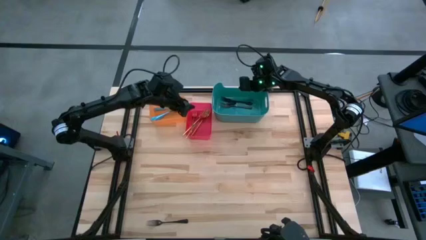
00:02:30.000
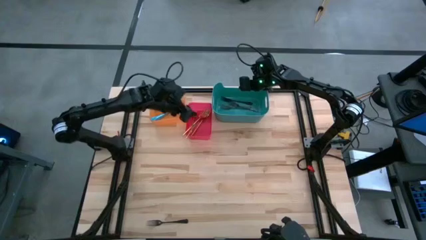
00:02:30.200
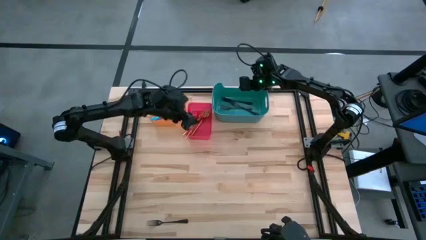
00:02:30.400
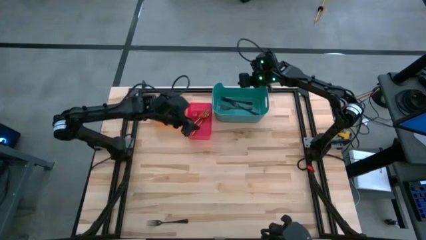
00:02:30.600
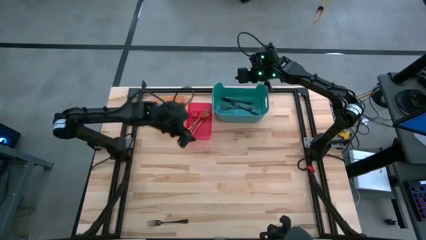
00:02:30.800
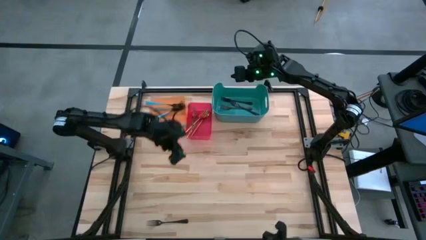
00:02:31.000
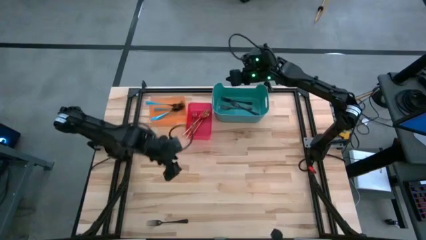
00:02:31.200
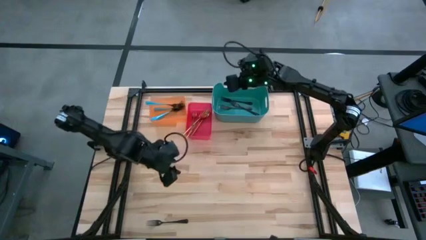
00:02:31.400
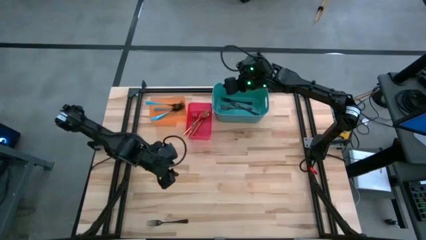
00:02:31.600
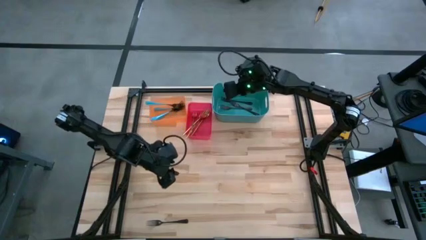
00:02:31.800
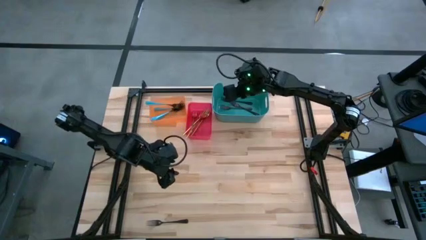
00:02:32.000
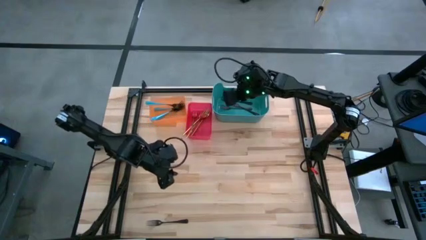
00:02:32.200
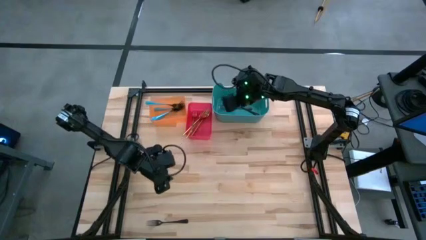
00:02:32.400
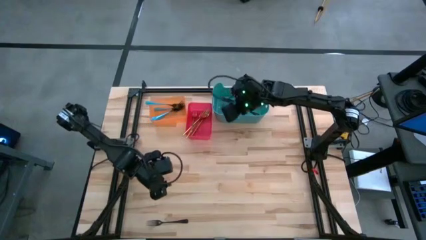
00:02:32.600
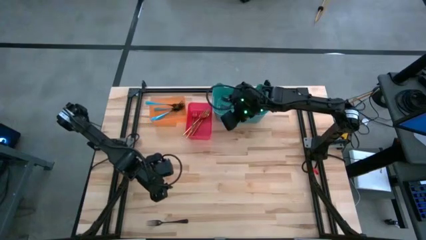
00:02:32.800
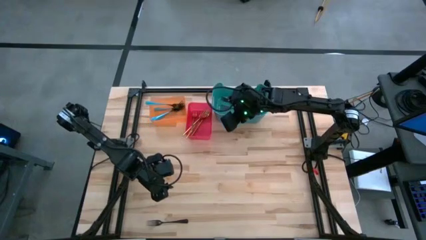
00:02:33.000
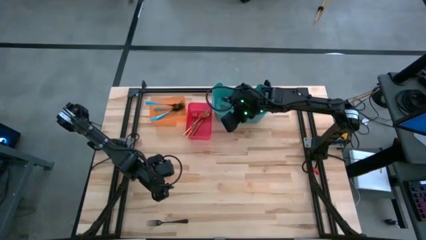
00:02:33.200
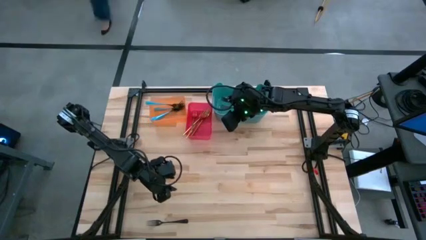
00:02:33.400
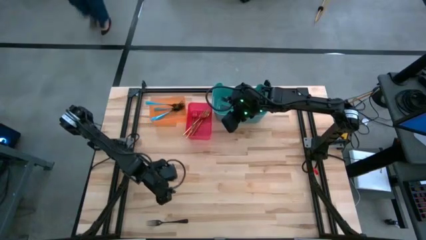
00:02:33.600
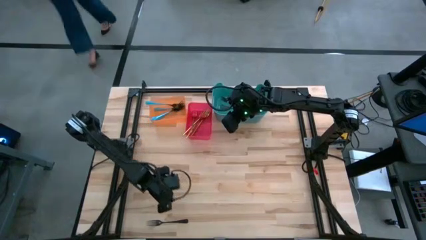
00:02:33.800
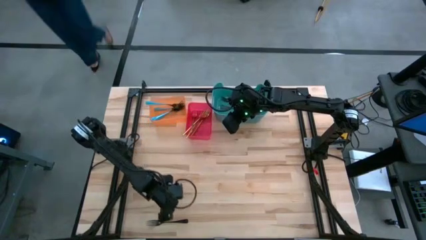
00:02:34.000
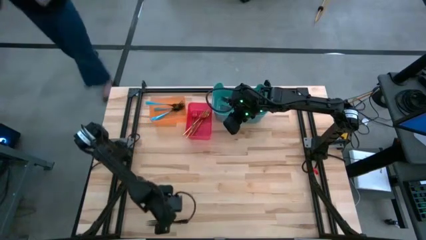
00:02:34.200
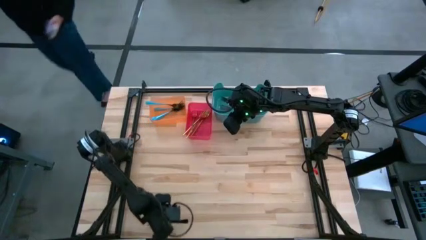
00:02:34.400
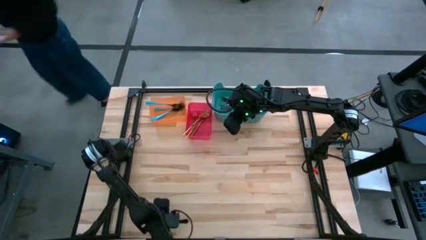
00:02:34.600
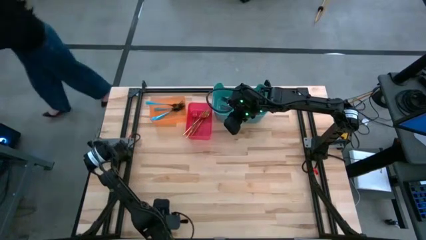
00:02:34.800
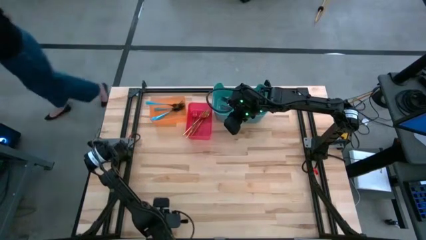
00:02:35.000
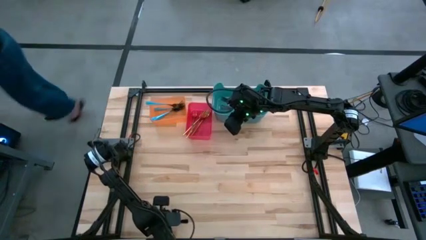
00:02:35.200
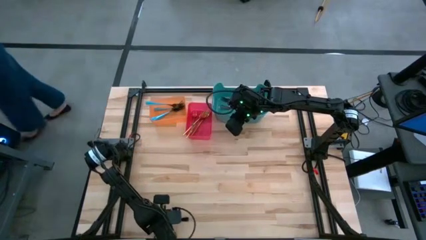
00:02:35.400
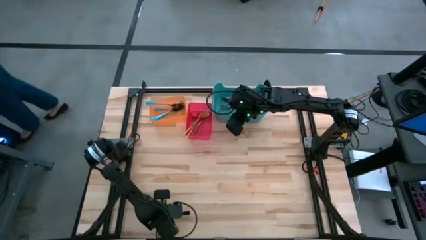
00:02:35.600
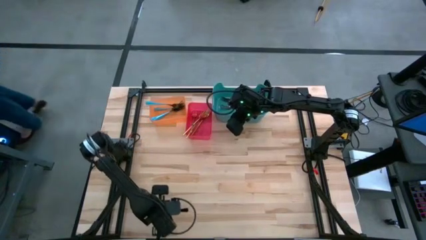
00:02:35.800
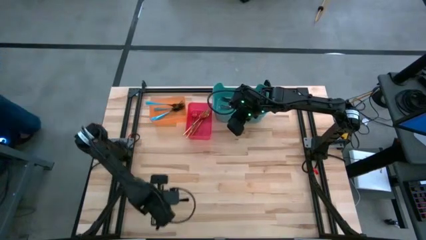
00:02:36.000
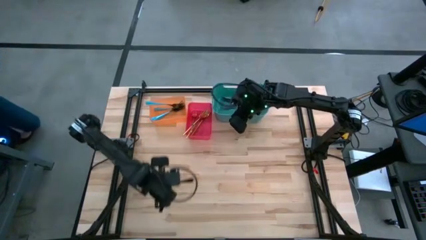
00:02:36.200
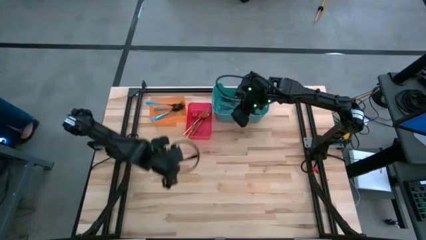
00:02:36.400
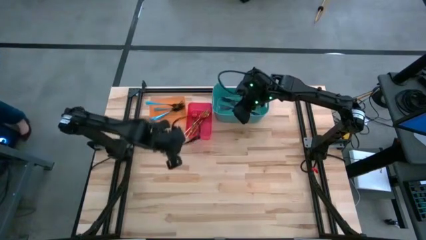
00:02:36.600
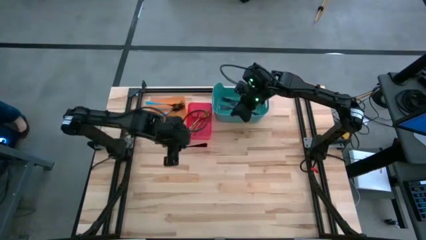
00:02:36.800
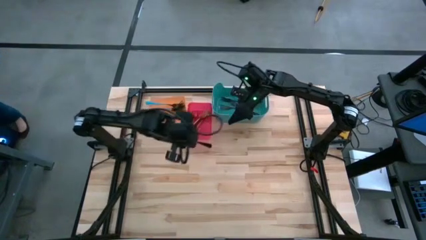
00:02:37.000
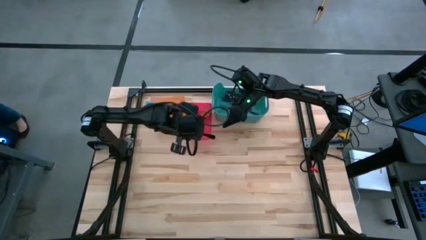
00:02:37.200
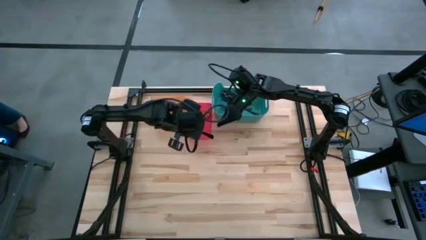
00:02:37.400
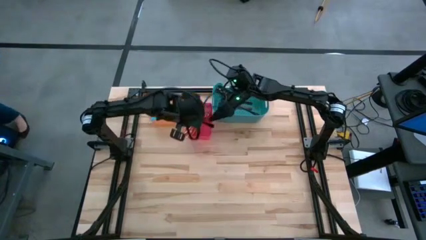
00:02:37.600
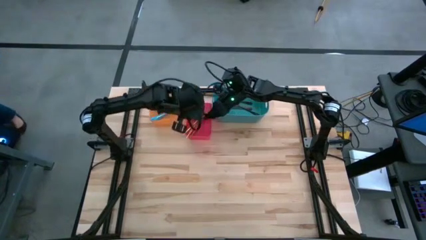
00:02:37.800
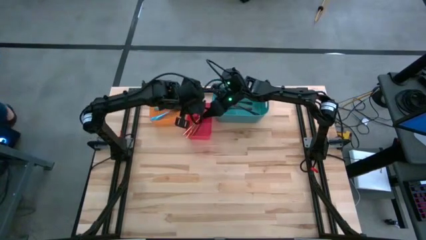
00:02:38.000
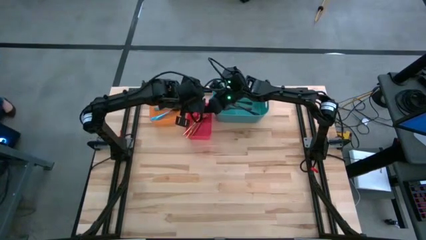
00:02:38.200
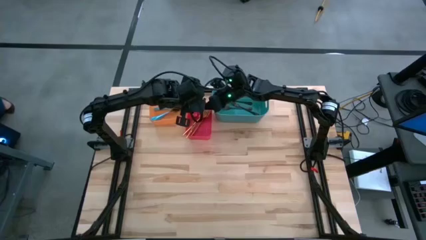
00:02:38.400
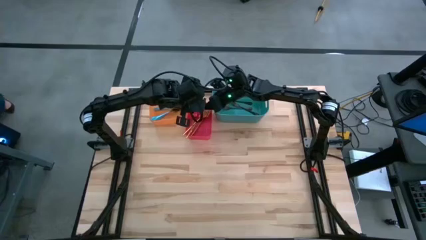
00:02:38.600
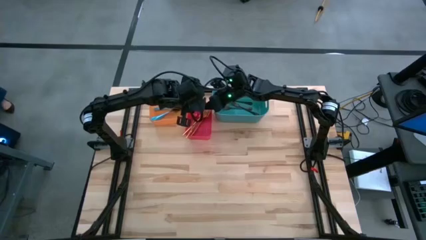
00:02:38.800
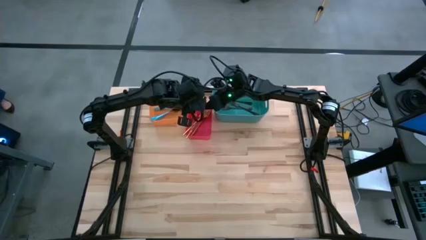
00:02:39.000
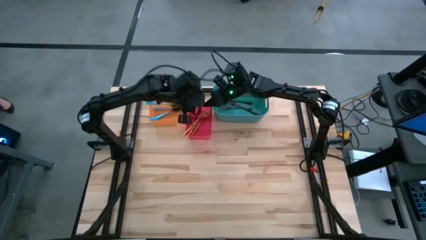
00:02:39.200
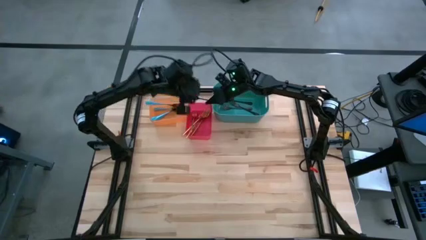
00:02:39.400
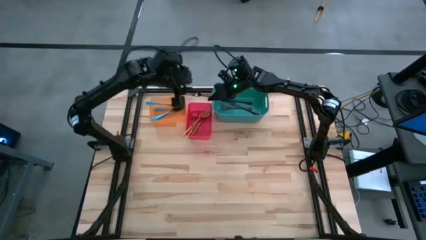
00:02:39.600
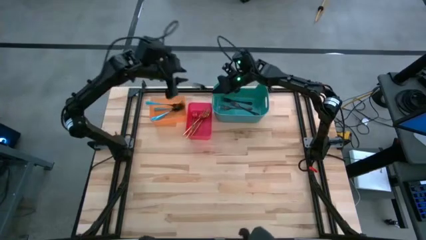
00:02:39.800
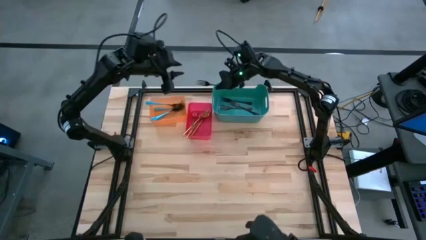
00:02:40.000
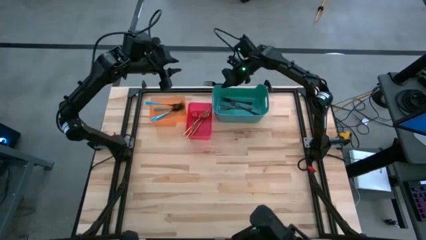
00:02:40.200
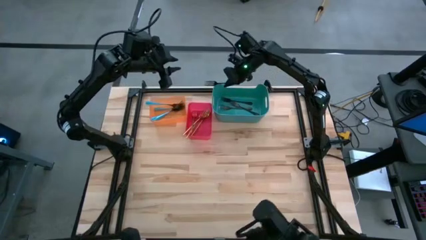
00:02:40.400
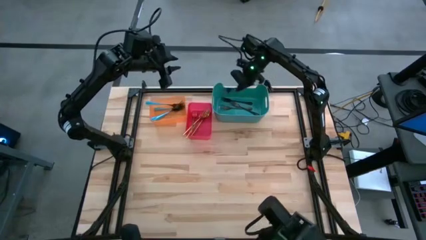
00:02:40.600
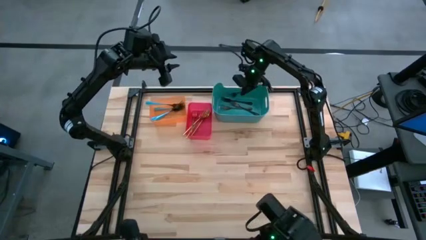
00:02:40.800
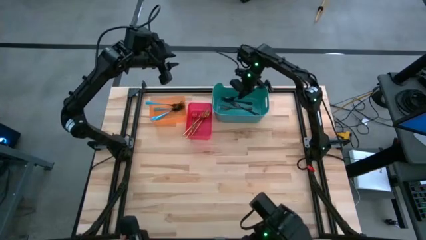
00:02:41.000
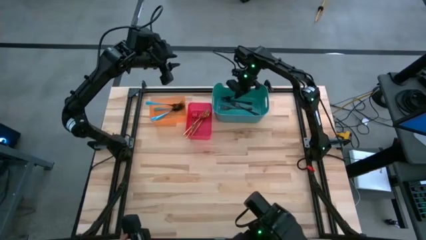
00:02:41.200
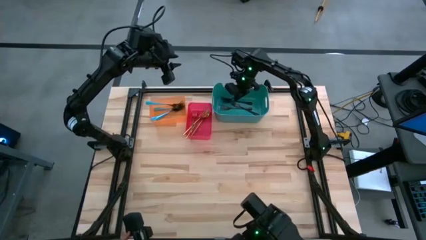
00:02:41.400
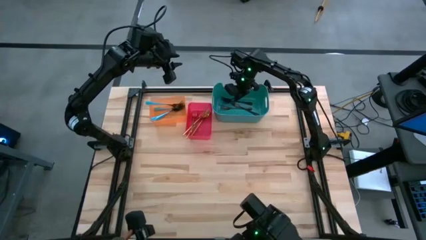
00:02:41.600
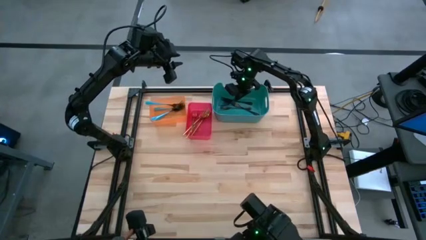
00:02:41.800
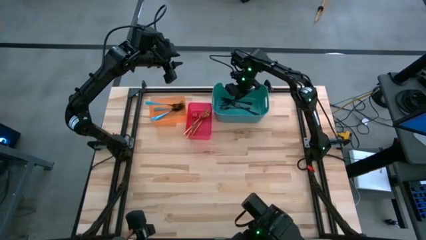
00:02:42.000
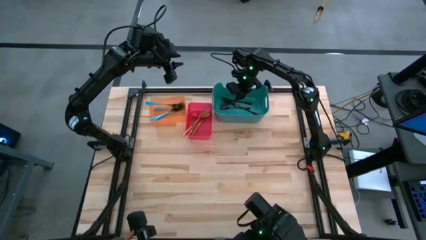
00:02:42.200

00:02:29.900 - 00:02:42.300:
Task: Sort silverware by color (type)
Put the black fork into the green bin
